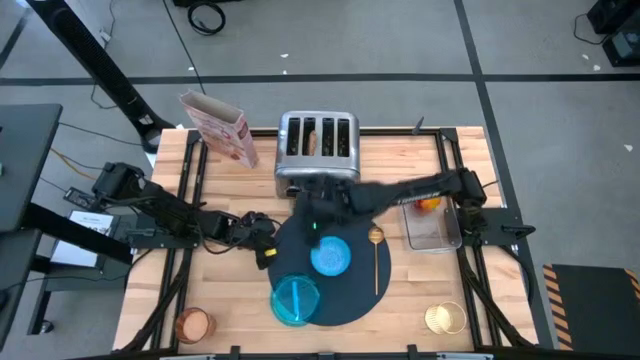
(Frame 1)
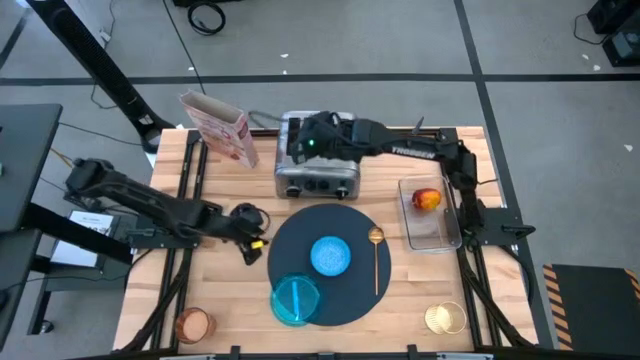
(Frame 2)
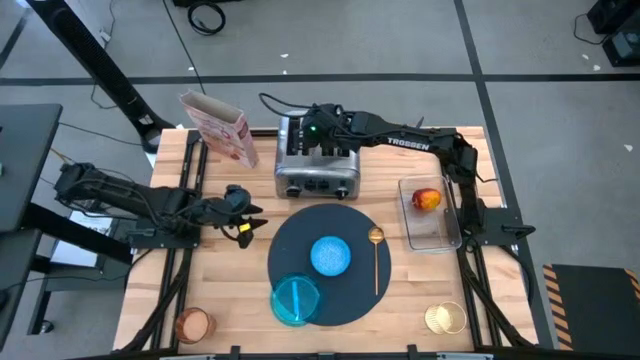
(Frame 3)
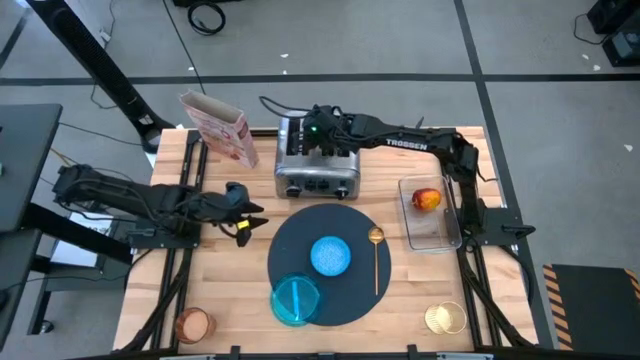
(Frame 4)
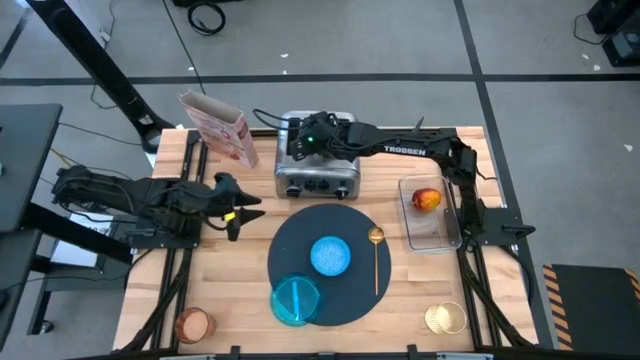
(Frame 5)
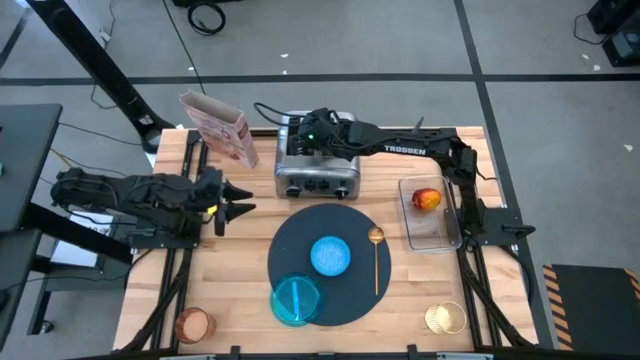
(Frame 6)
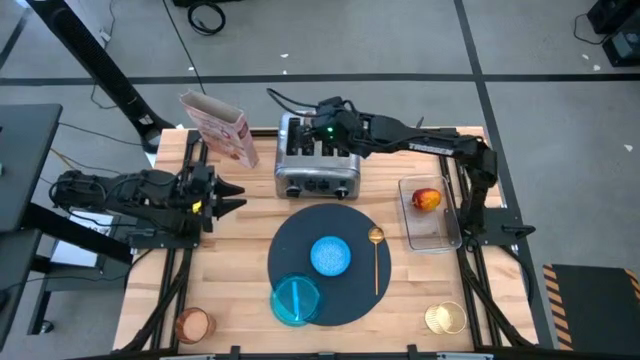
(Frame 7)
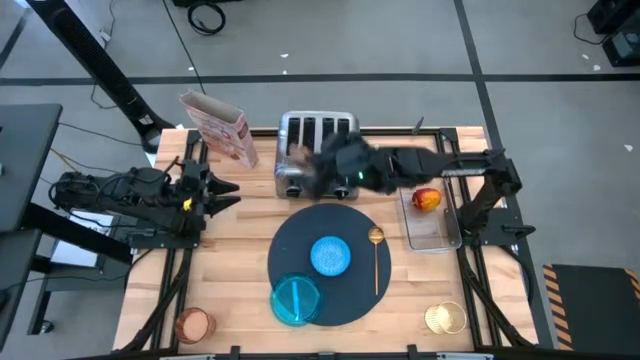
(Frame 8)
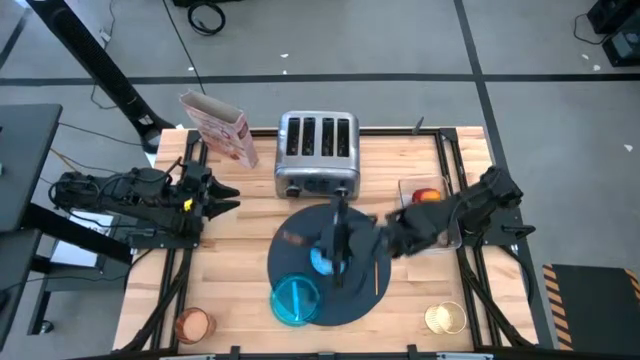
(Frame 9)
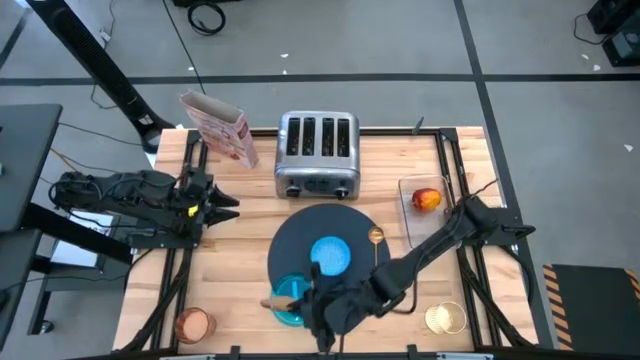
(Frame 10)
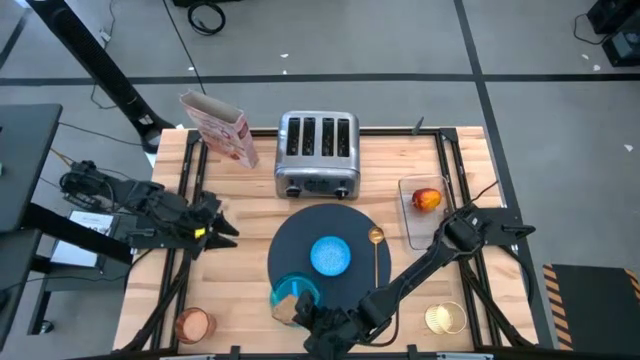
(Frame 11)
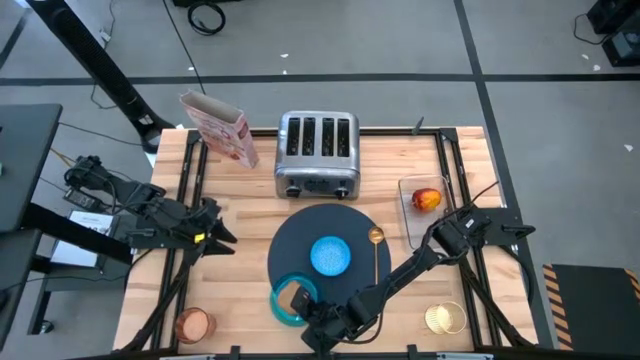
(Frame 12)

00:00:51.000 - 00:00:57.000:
Task: Arrange a breakfast setting
Put the toasted bread on the blue plate

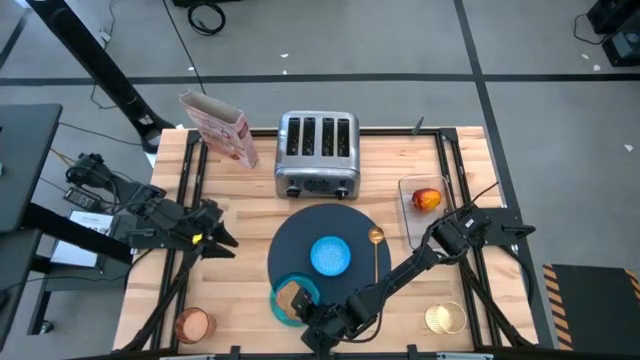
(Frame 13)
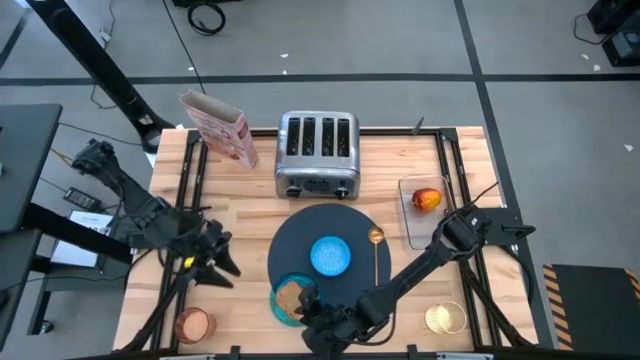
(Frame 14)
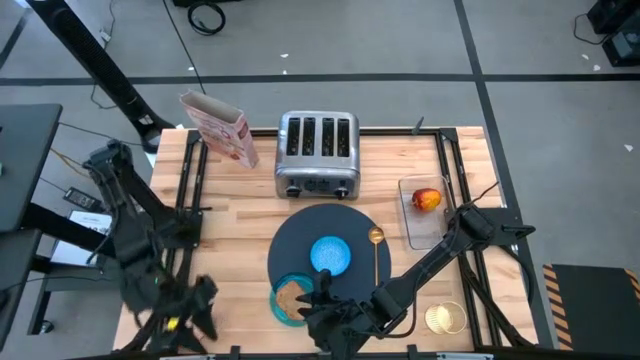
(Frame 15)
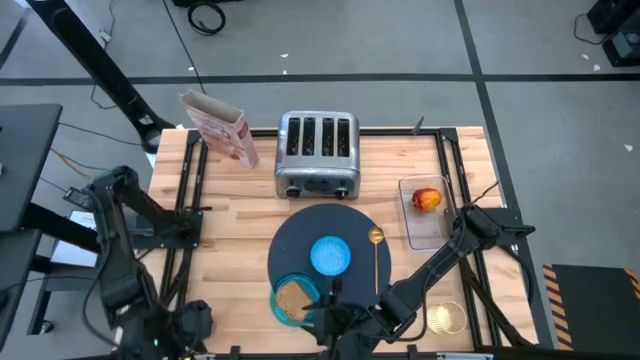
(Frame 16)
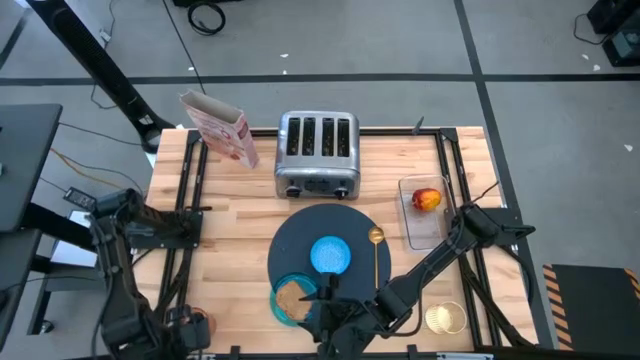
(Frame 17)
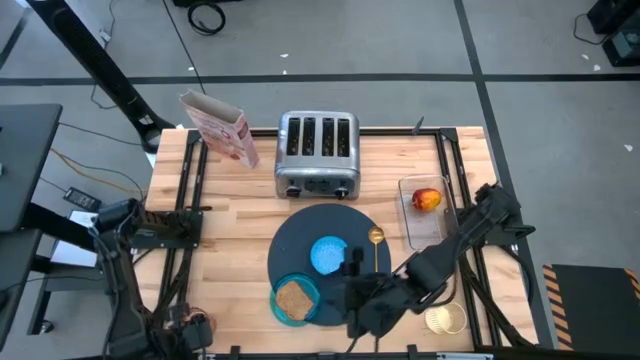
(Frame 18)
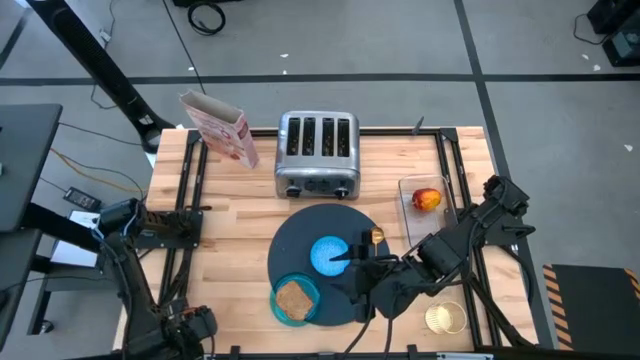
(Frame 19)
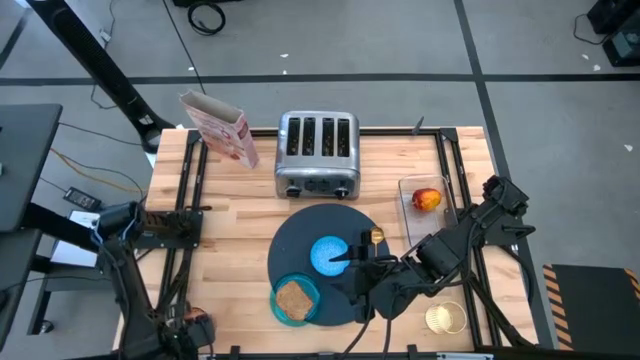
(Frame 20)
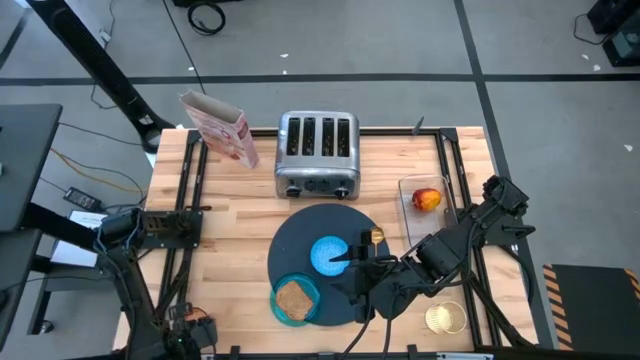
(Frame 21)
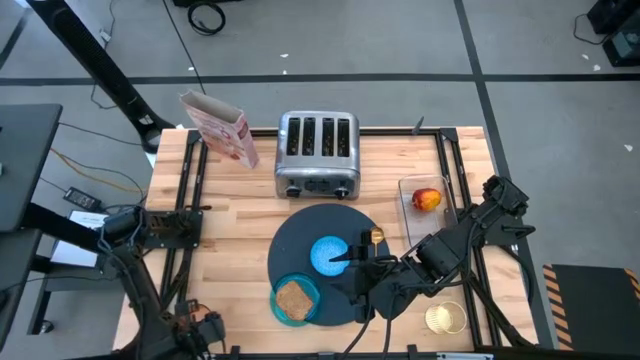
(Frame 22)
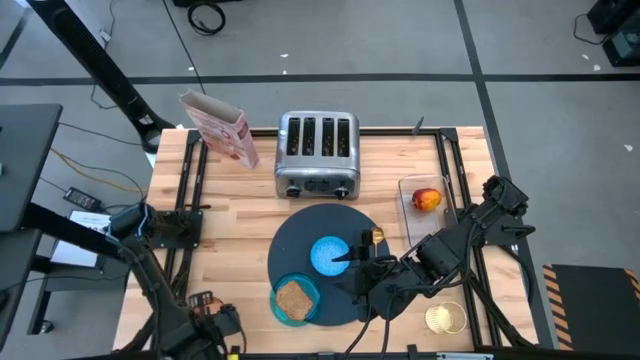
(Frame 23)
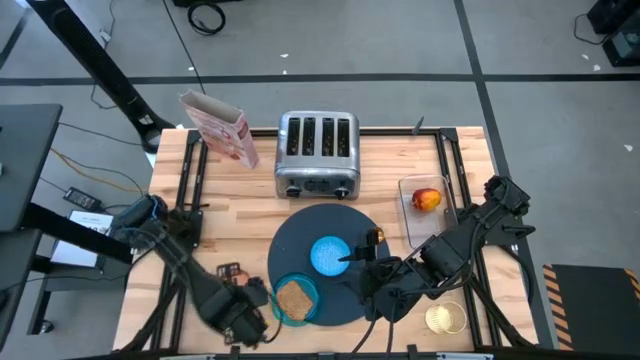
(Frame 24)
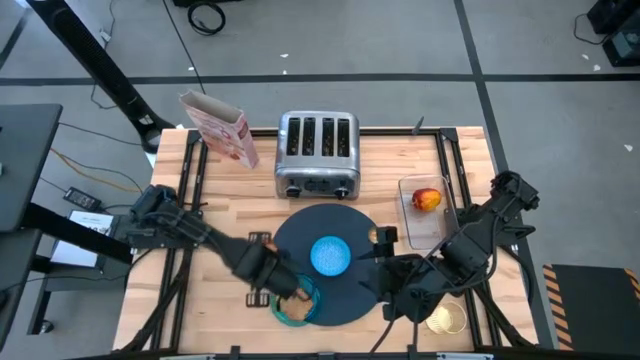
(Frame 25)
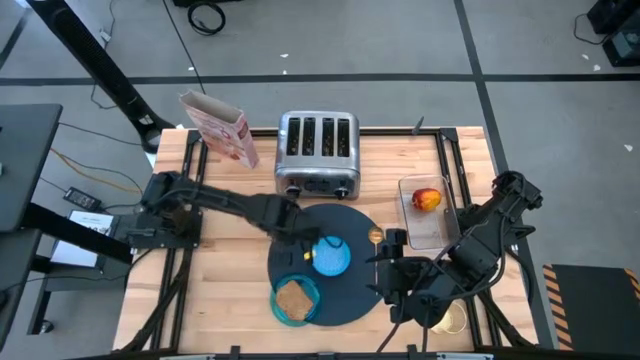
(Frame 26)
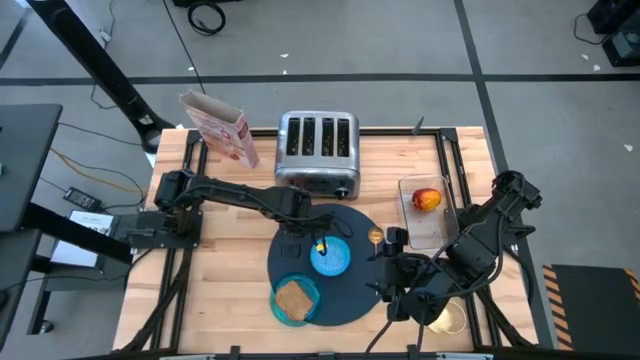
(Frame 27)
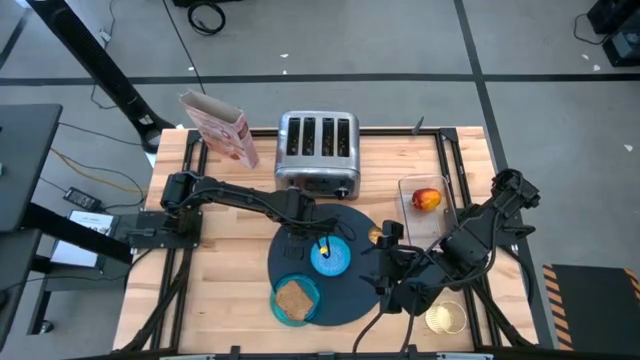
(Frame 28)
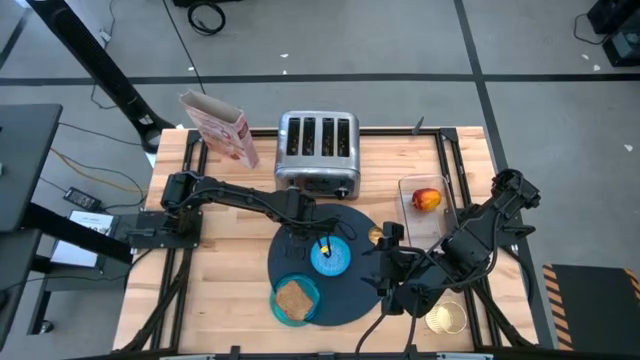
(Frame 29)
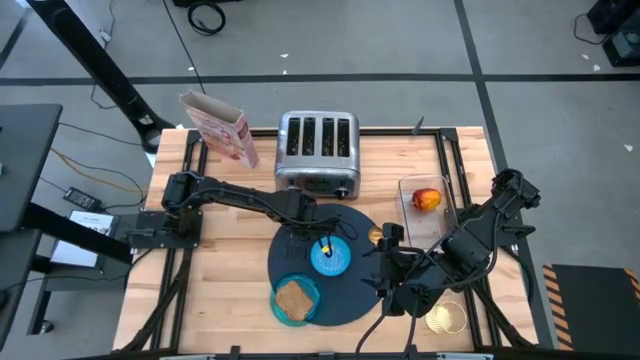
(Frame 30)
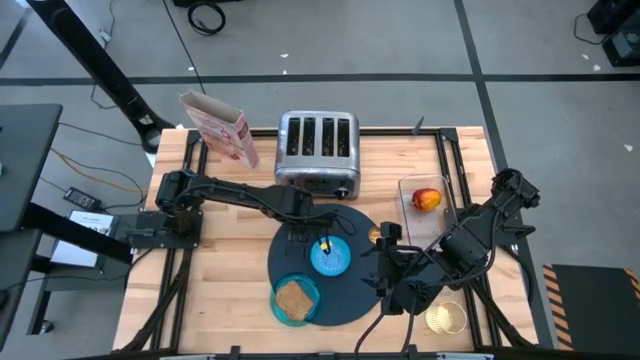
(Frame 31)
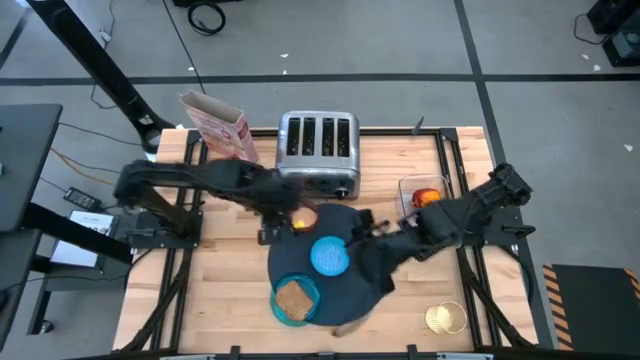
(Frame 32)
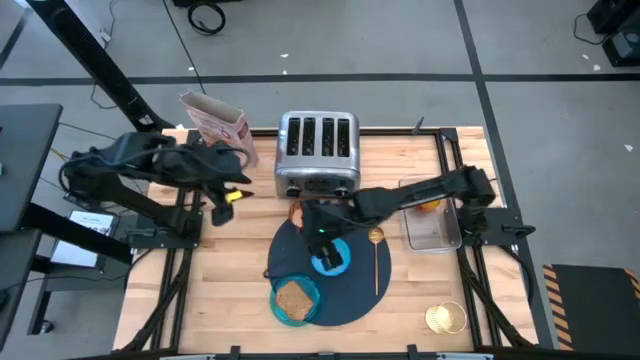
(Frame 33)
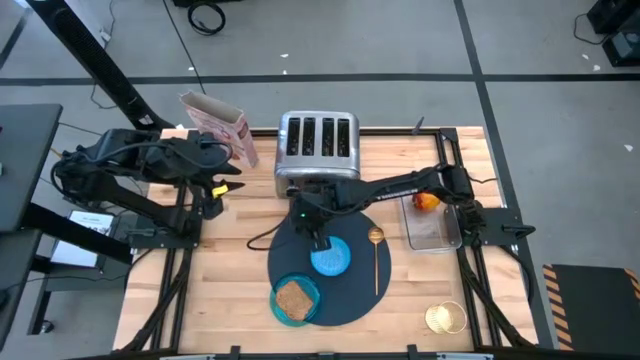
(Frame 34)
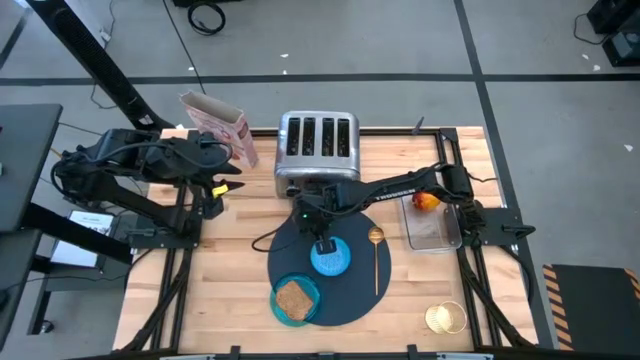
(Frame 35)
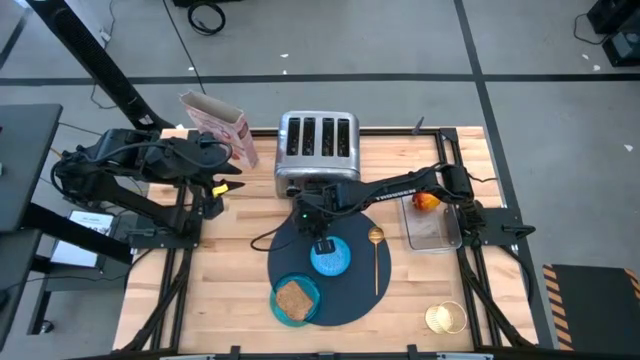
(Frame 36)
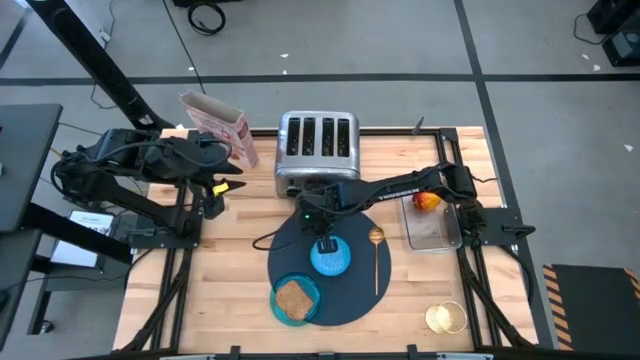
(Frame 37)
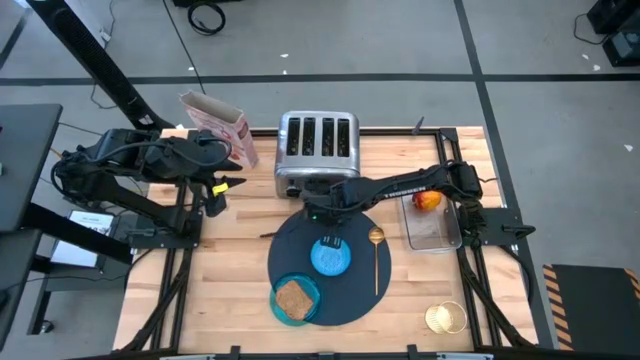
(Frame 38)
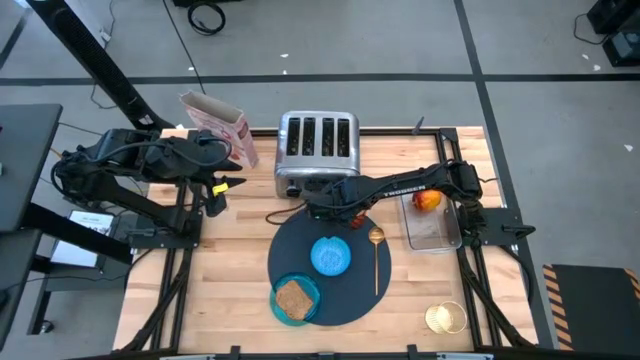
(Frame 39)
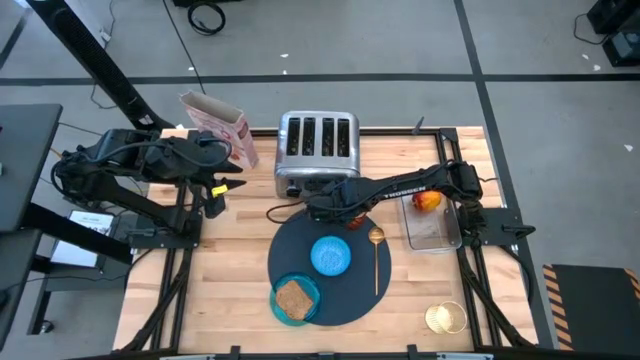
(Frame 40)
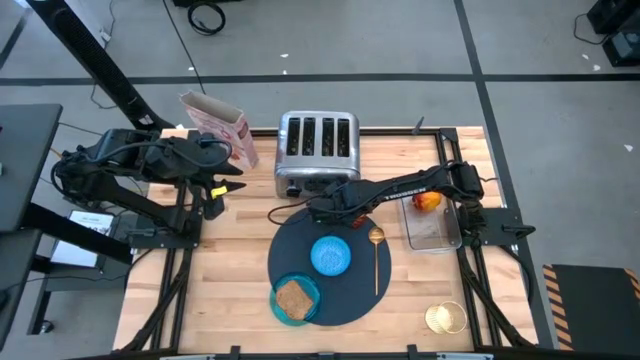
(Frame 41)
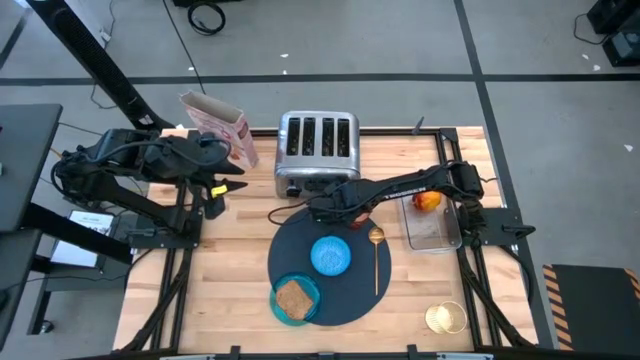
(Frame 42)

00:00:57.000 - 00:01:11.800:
Put the orange cup of milk on the blue table mat

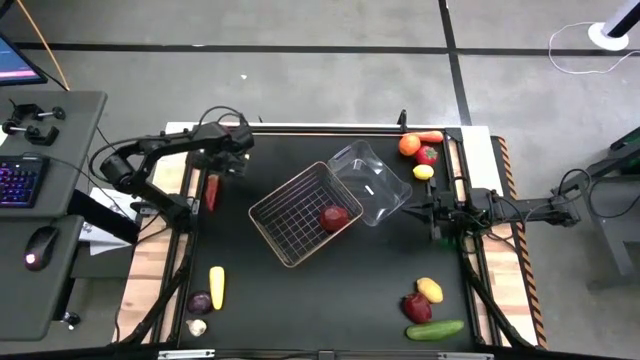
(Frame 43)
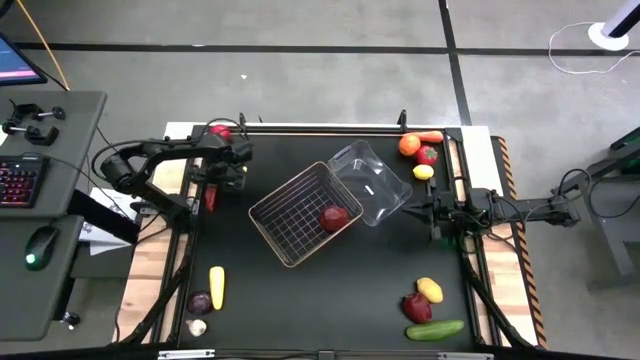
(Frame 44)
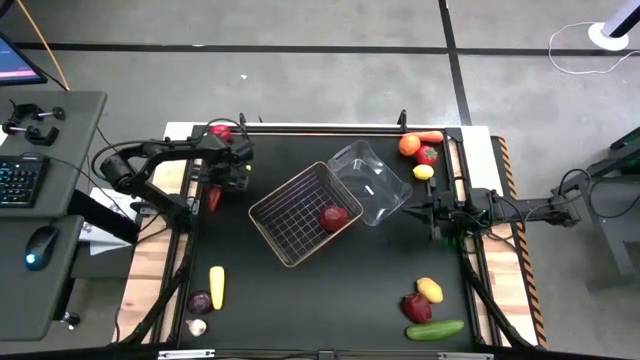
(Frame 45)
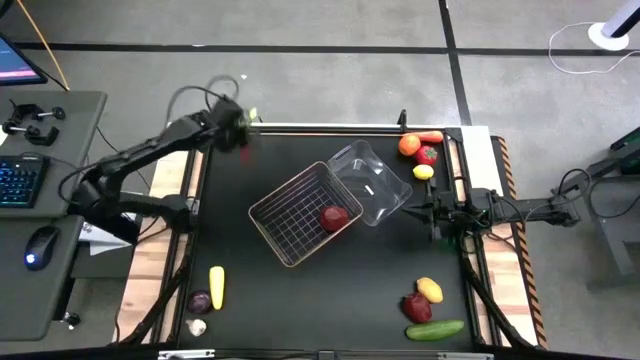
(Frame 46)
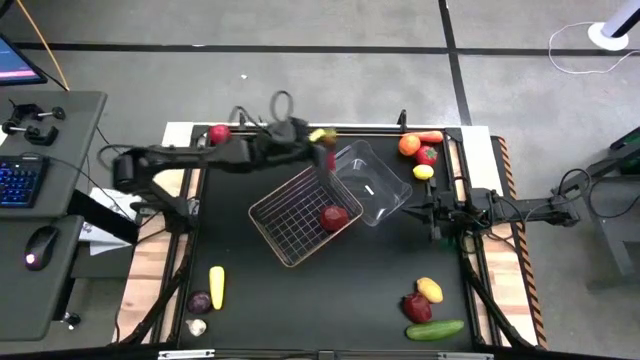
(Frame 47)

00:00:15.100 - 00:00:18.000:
Task: Sort produce into baskets
Put the chili pepper into the transparent bin
